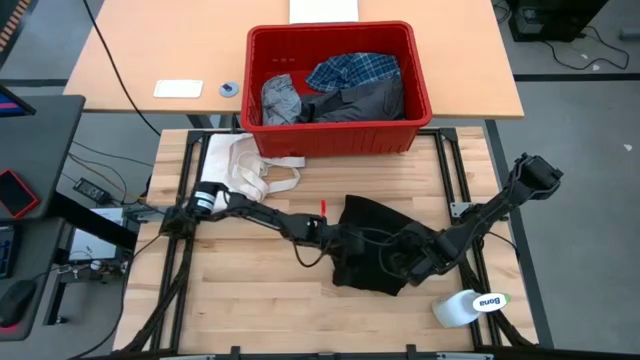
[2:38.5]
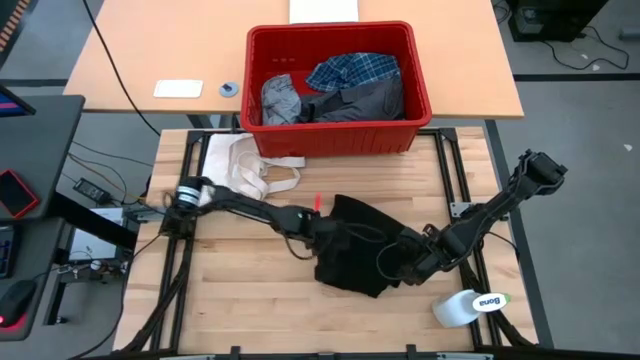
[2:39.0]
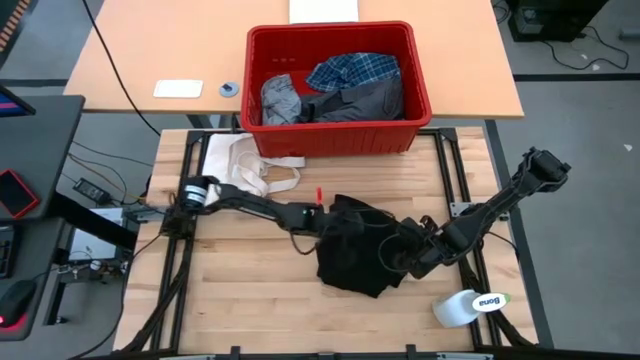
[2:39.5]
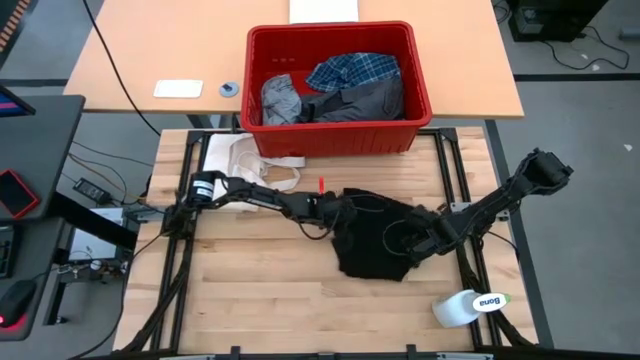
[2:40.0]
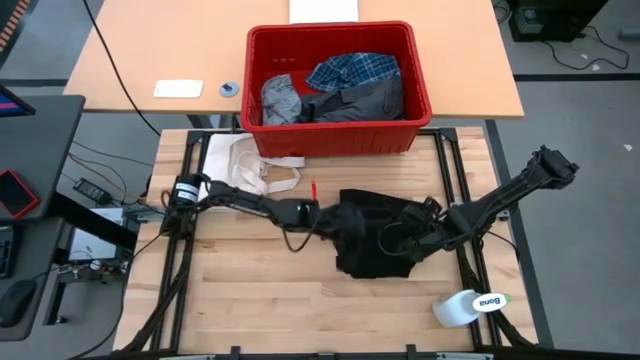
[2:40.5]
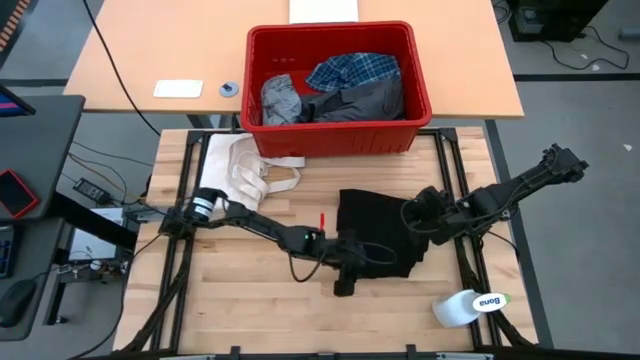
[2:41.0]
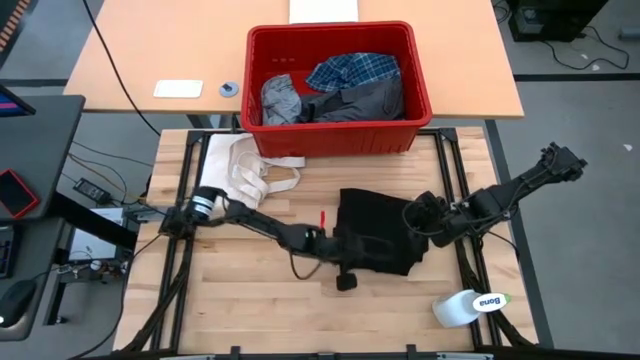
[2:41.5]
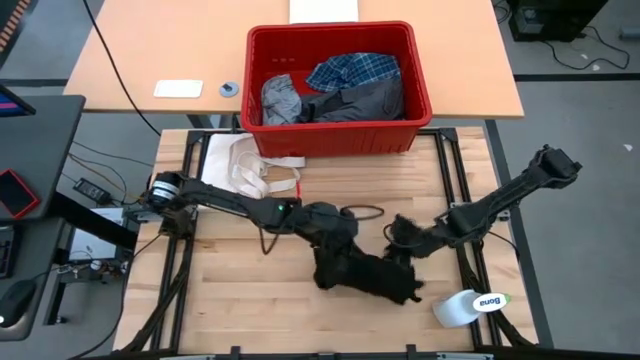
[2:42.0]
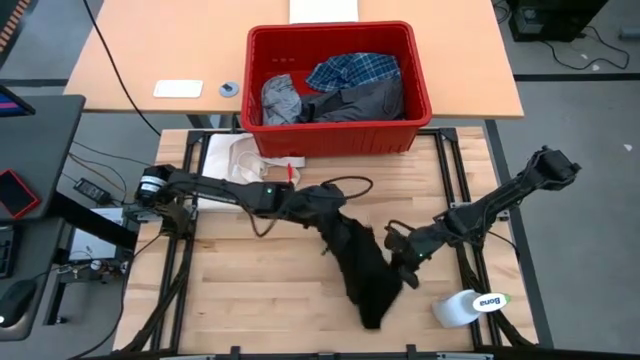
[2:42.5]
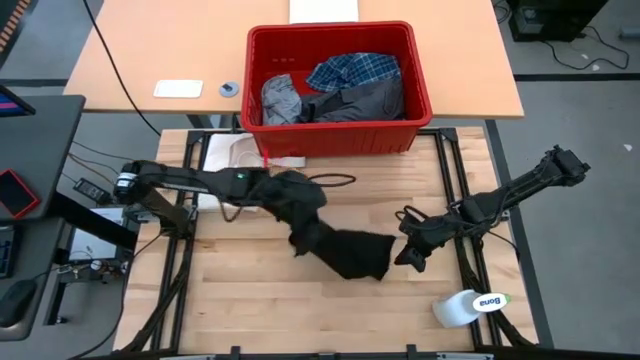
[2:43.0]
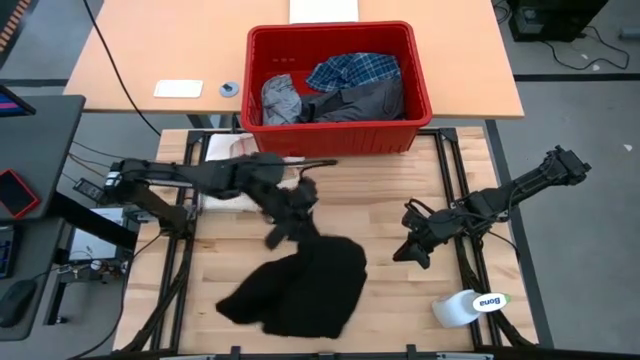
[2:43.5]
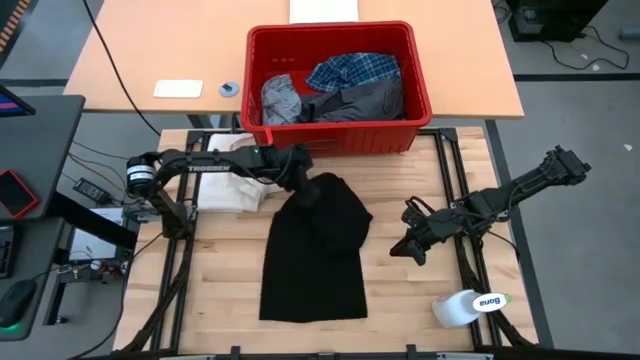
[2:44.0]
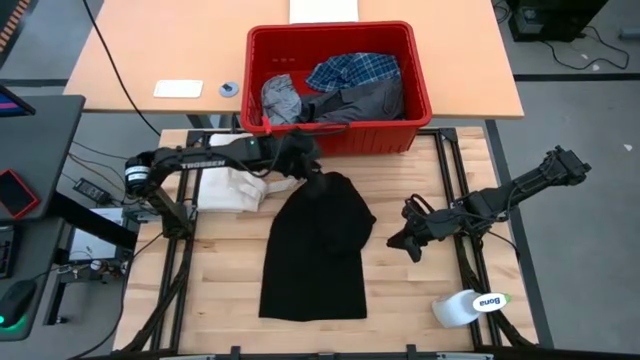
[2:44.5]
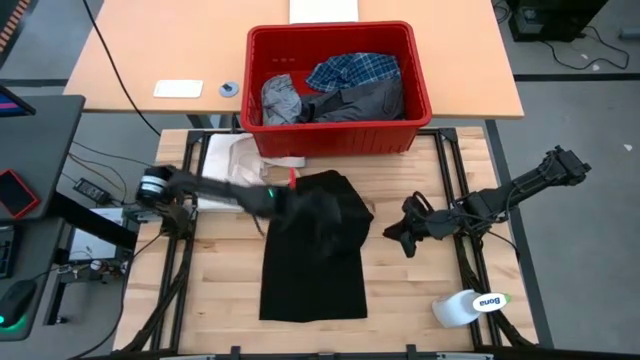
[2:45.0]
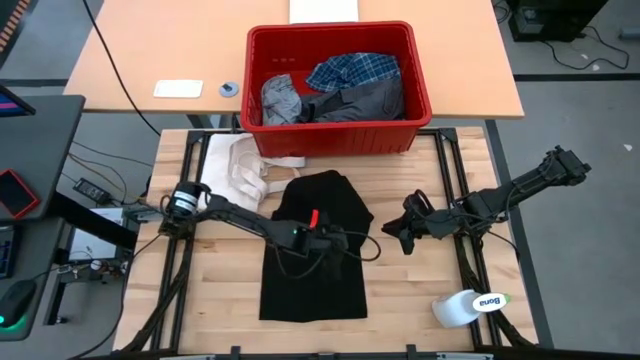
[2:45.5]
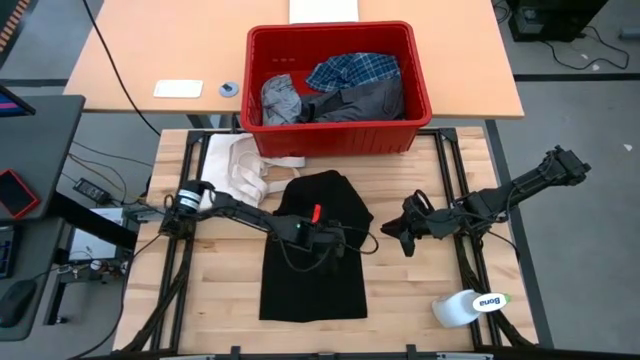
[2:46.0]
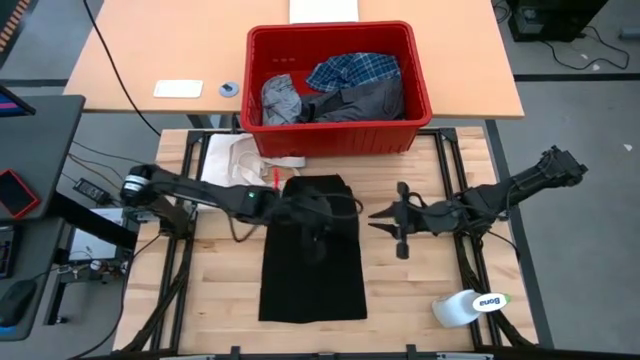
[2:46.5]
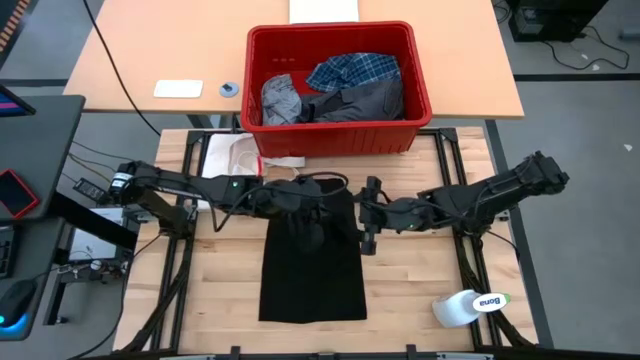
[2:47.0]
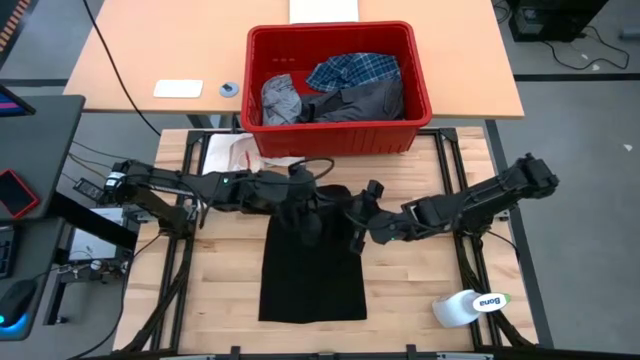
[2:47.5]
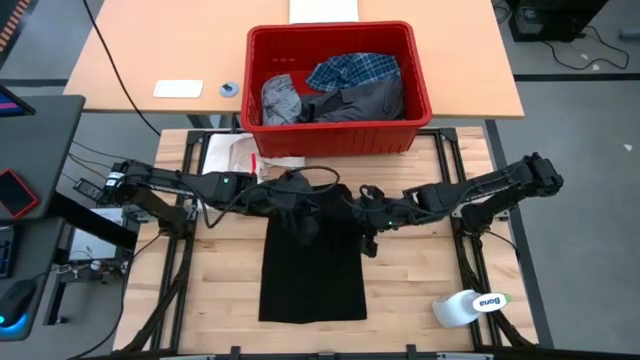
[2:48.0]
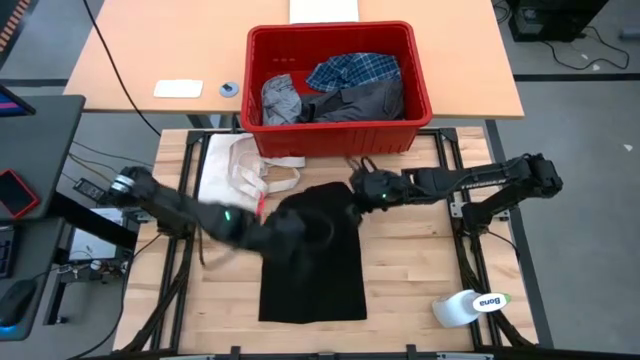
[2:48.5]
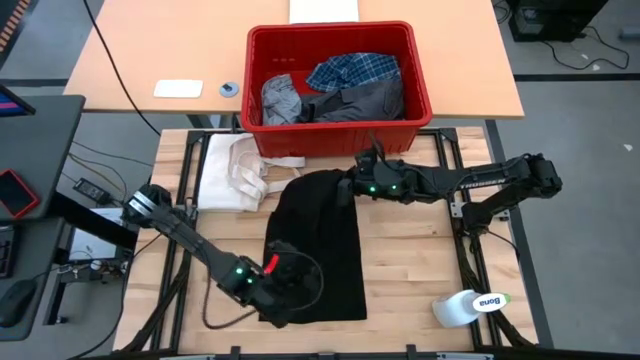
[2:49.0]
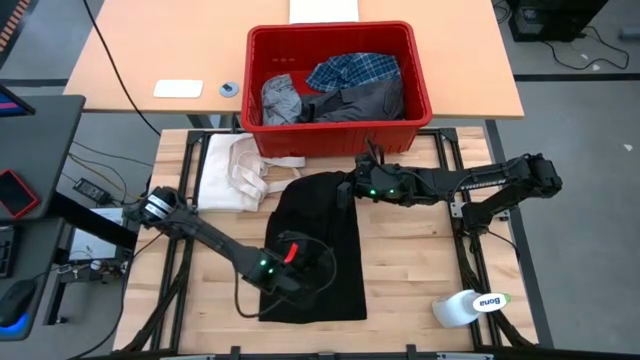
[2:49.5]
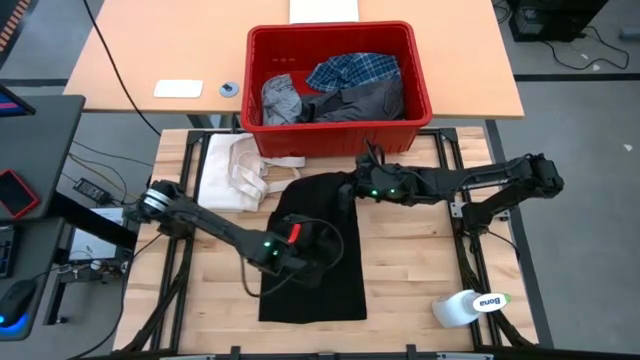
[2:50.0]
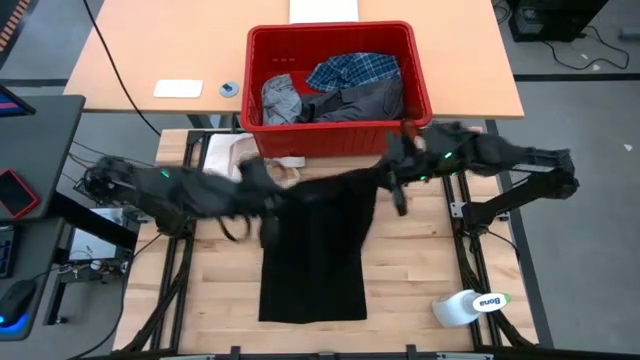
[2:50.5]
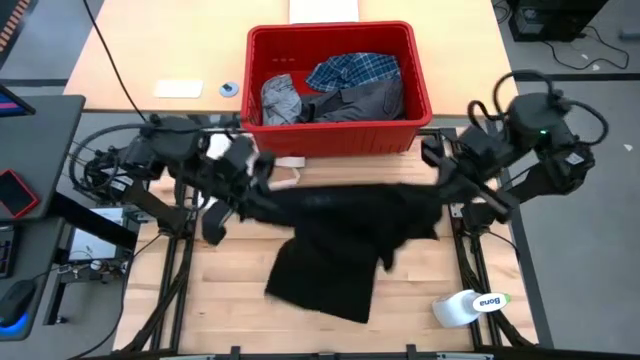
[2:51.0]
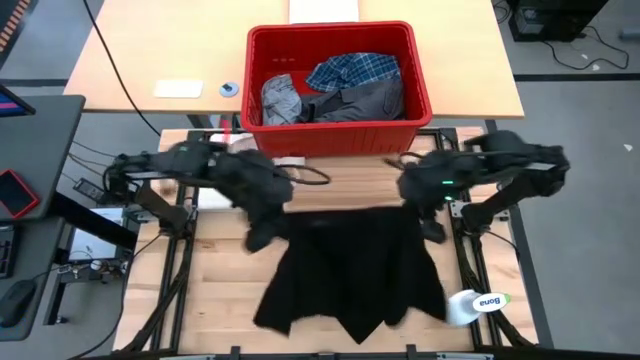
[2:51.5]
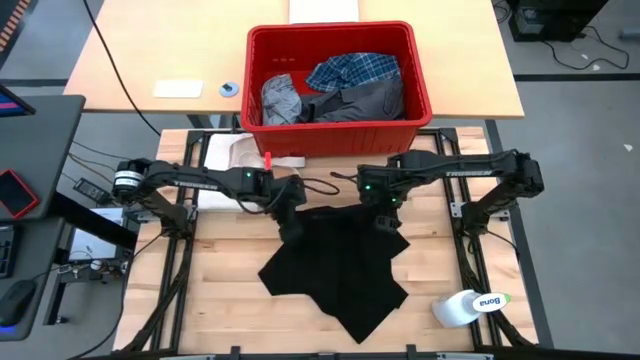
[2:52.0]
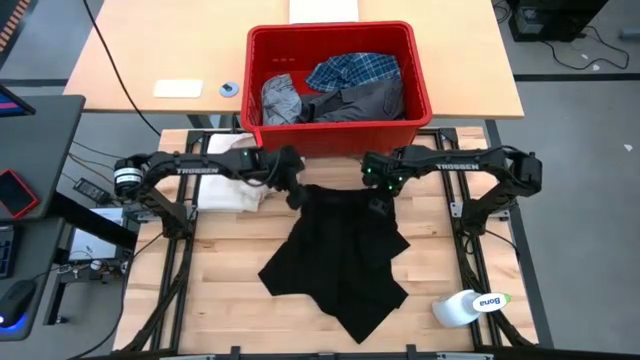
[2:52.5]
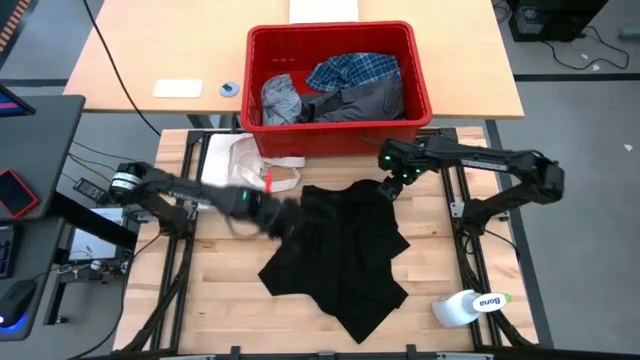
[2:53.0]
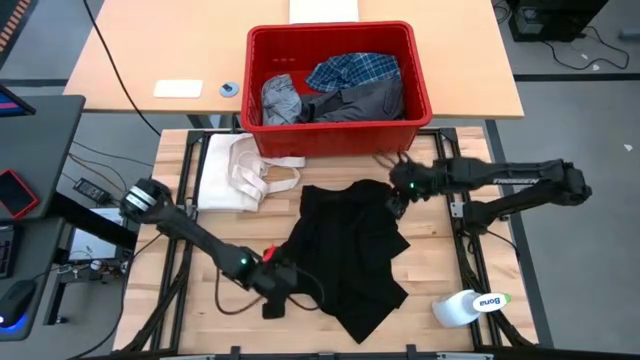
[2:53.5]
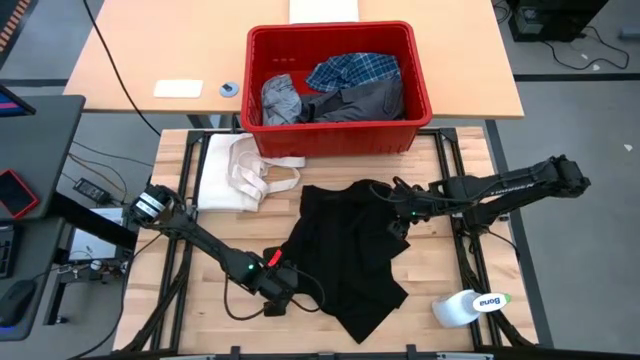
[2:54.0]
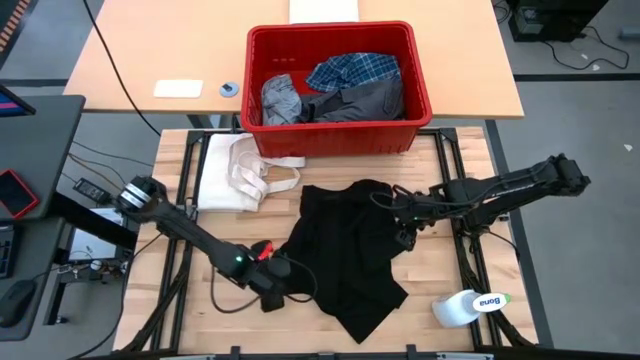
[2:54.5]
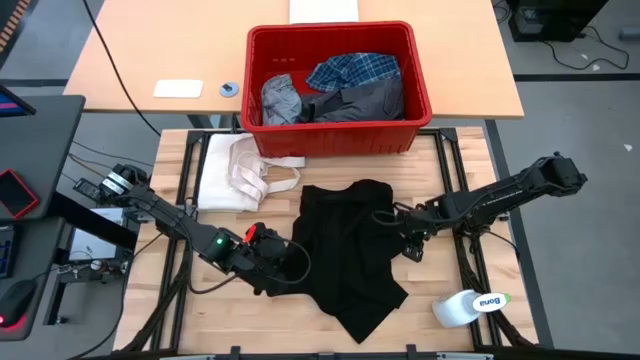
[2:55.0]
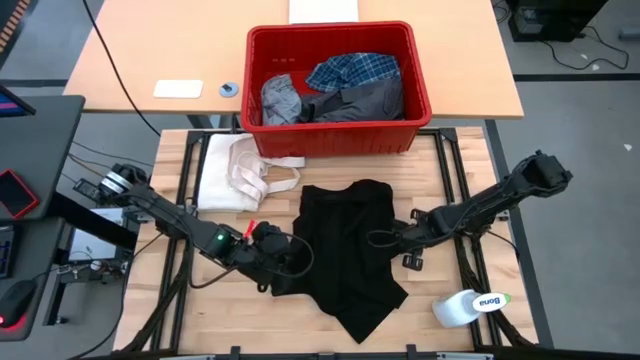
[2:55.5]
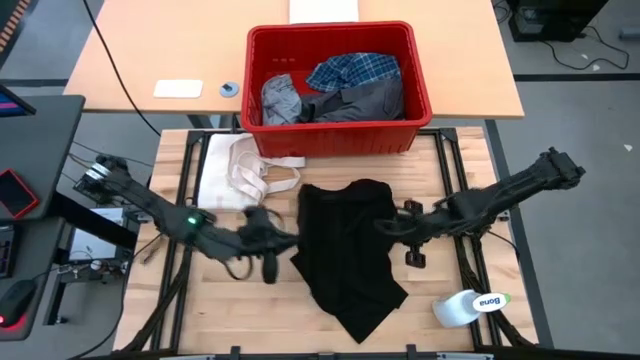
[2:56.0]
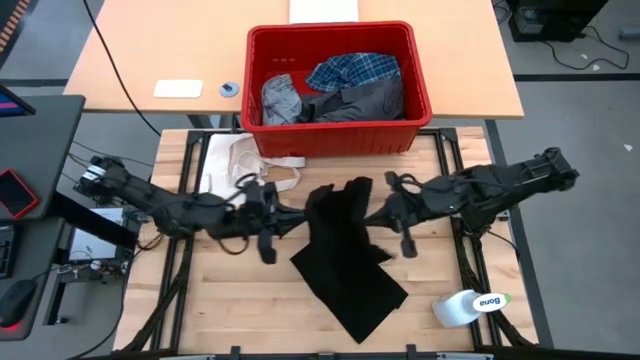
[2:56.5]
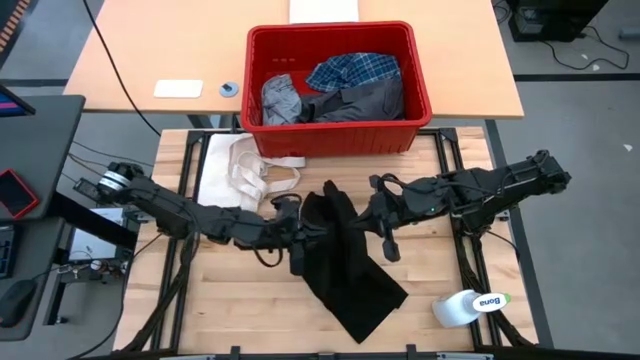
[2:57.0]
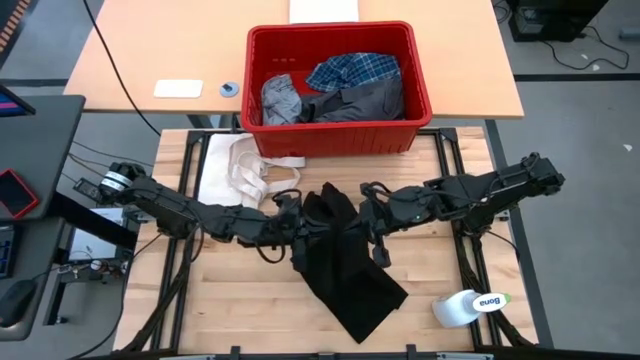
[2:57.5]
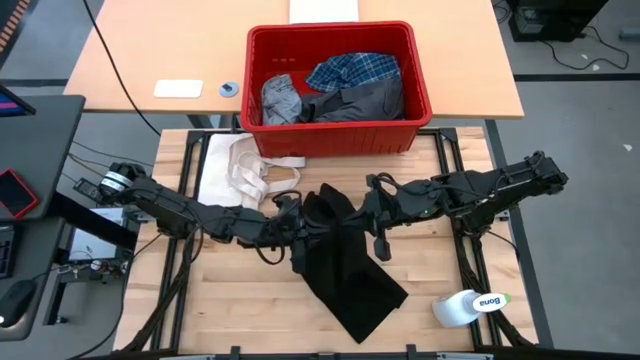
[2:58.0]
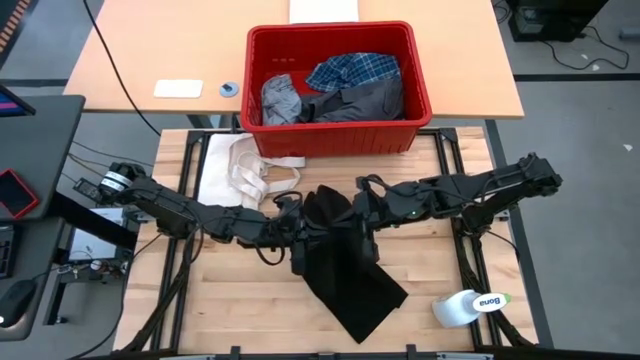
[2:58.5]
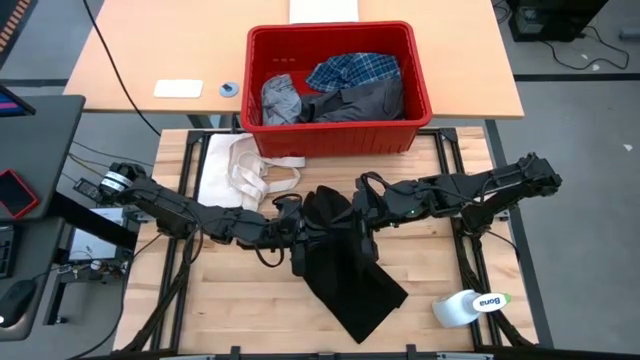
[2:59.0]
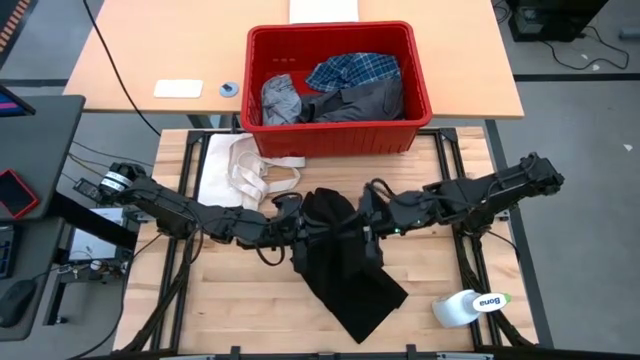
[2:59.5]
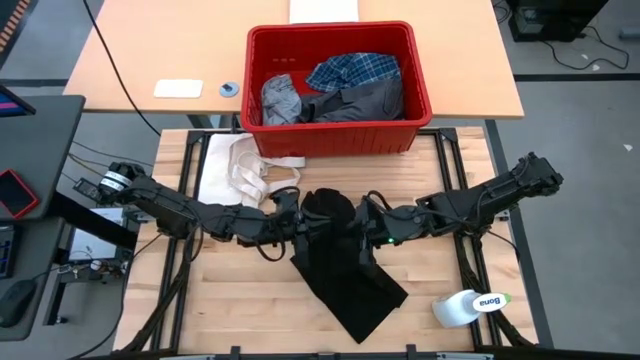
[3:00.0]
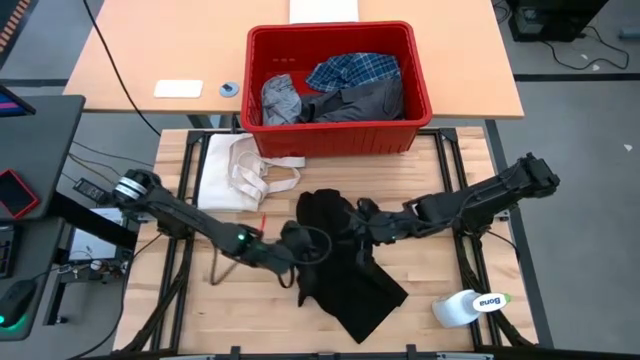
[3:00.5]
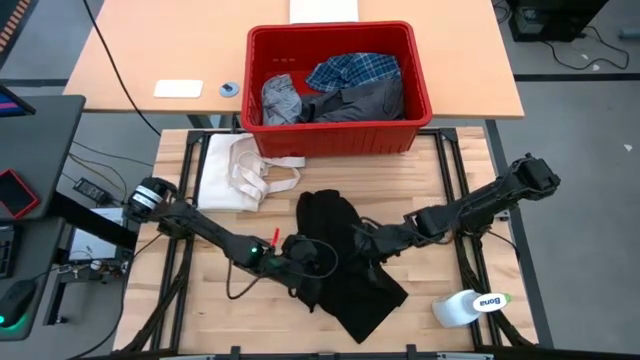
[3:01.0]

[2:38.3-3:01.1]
Task: Fold Laundry from Bin
Fold the black shirt
